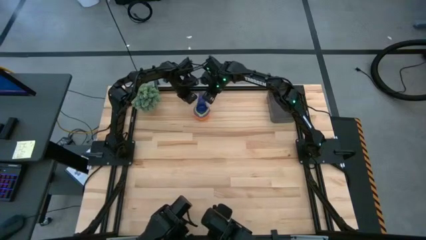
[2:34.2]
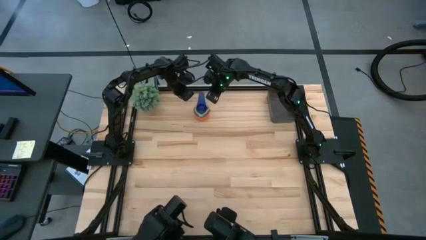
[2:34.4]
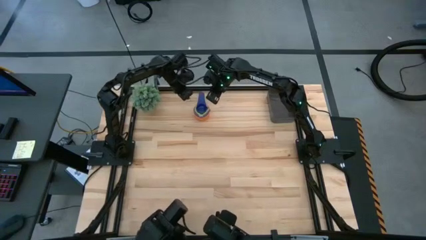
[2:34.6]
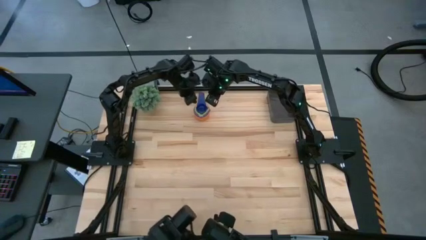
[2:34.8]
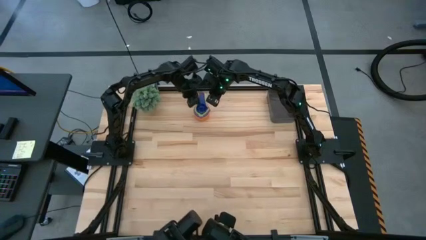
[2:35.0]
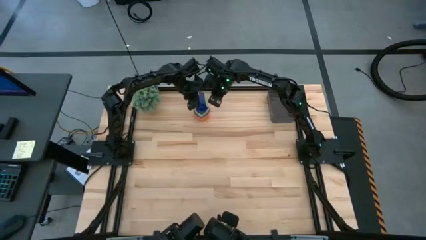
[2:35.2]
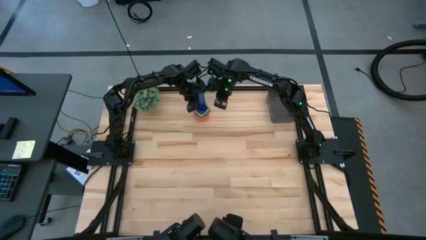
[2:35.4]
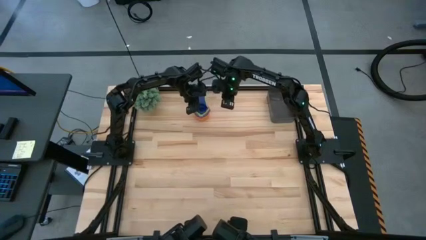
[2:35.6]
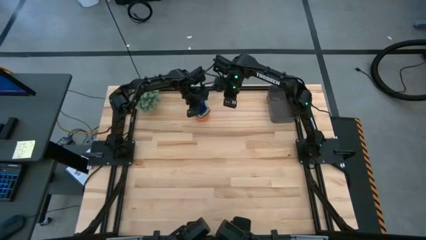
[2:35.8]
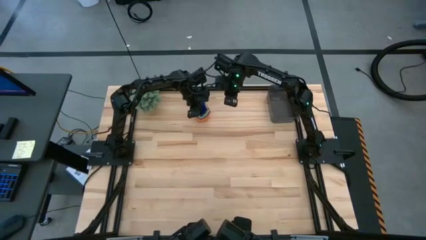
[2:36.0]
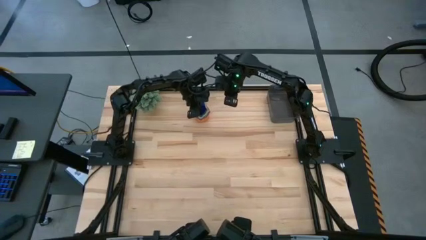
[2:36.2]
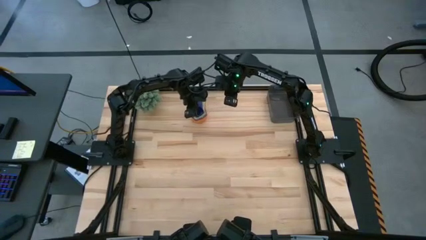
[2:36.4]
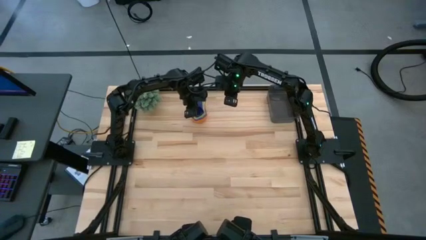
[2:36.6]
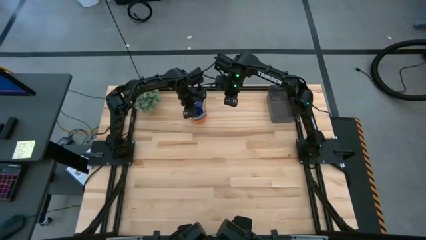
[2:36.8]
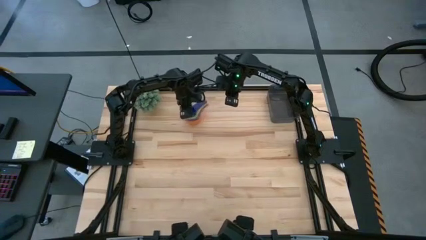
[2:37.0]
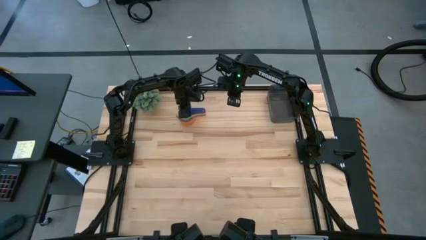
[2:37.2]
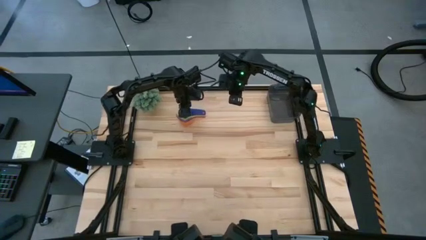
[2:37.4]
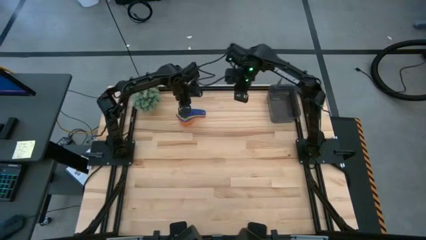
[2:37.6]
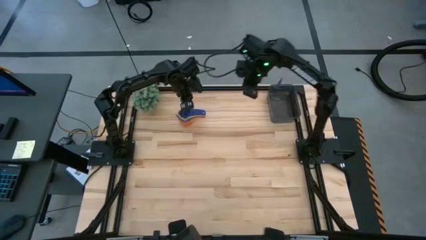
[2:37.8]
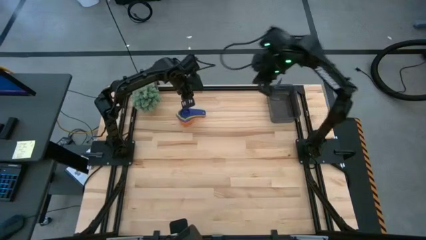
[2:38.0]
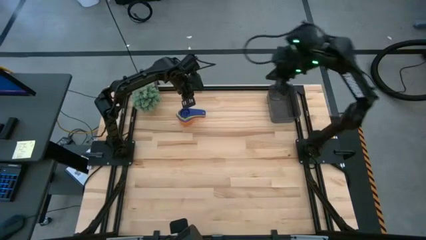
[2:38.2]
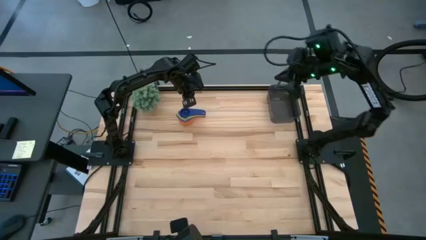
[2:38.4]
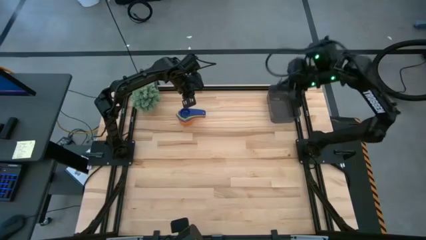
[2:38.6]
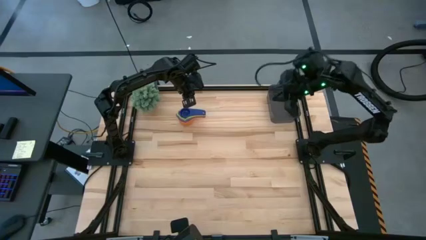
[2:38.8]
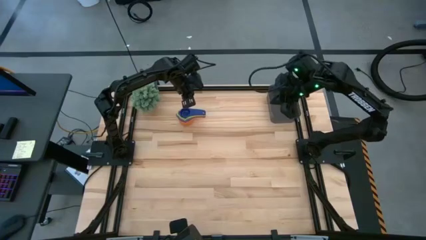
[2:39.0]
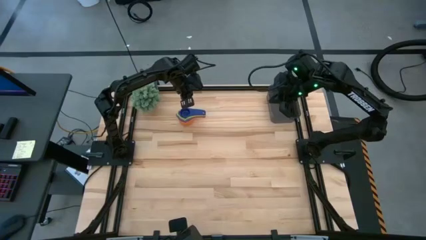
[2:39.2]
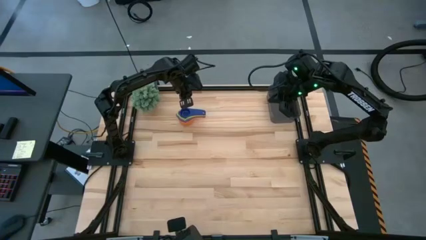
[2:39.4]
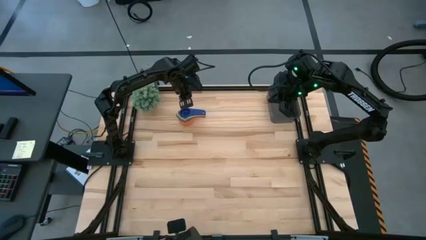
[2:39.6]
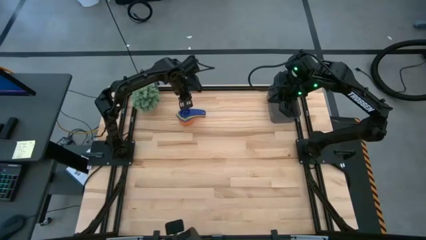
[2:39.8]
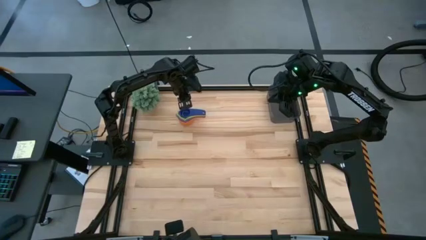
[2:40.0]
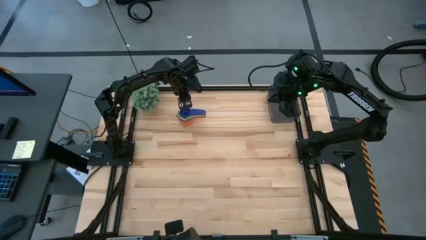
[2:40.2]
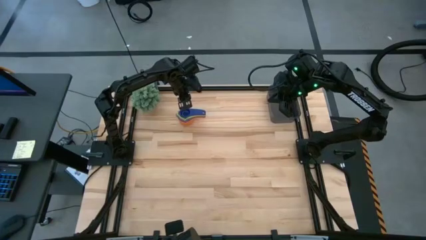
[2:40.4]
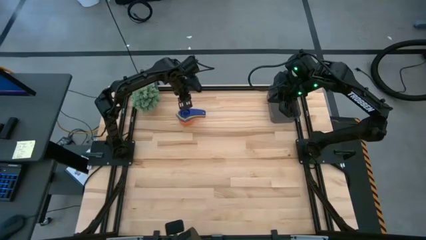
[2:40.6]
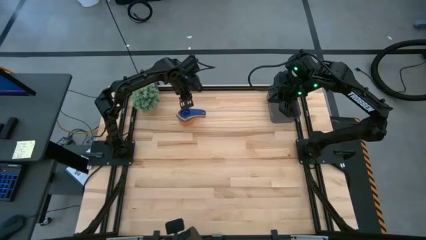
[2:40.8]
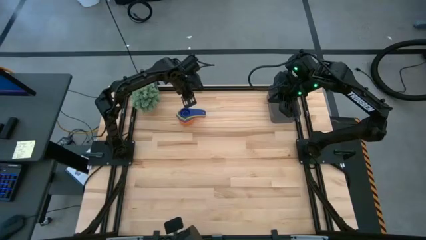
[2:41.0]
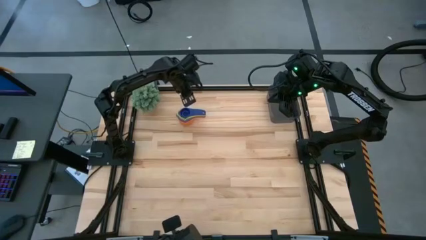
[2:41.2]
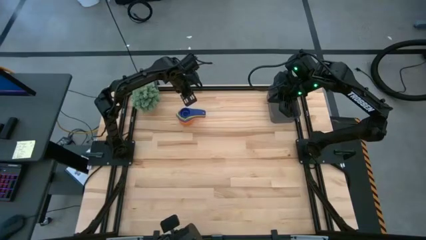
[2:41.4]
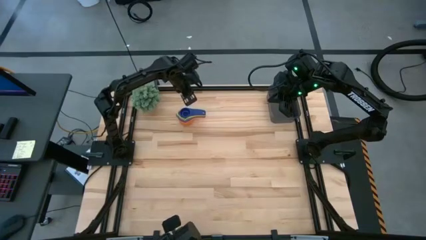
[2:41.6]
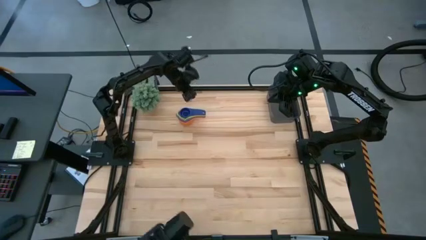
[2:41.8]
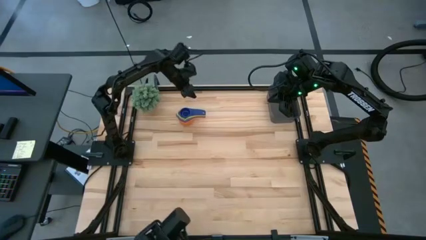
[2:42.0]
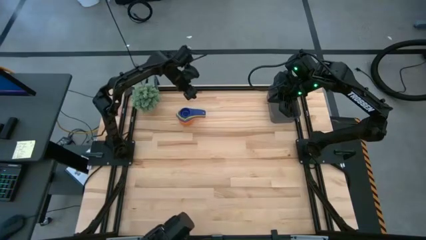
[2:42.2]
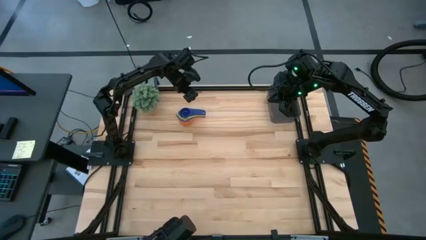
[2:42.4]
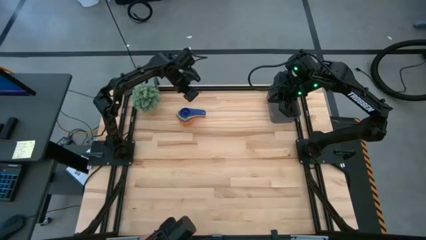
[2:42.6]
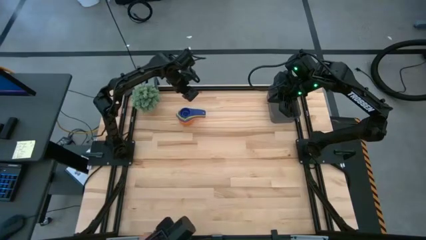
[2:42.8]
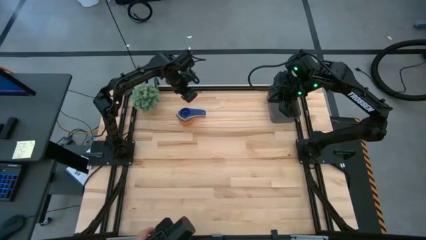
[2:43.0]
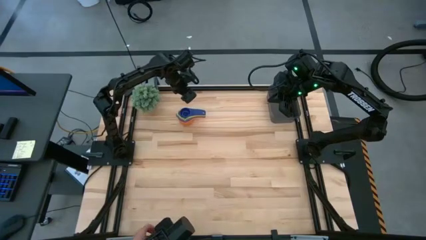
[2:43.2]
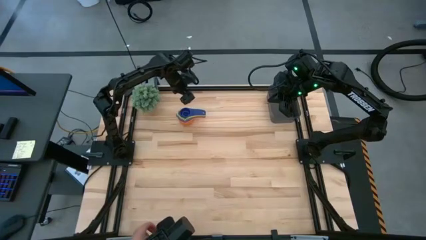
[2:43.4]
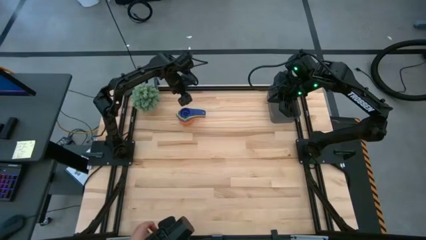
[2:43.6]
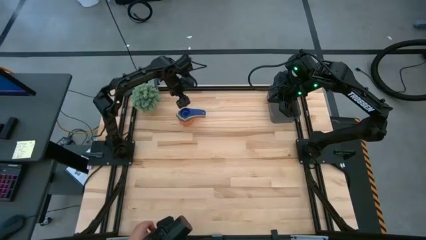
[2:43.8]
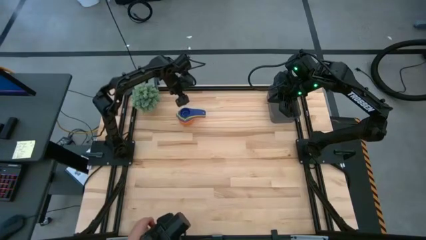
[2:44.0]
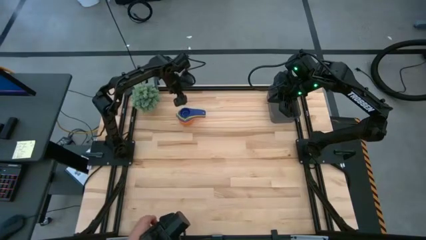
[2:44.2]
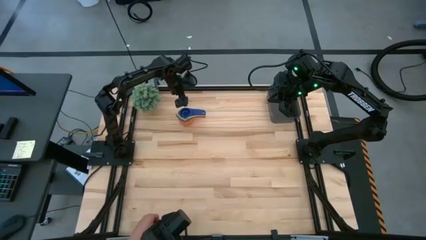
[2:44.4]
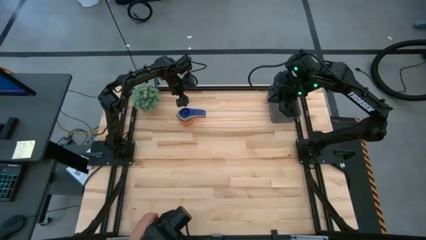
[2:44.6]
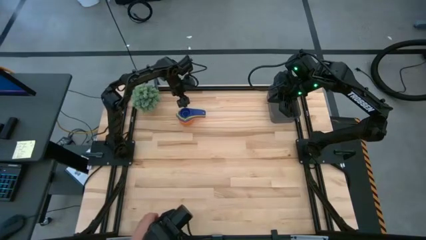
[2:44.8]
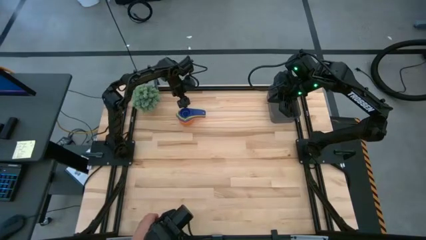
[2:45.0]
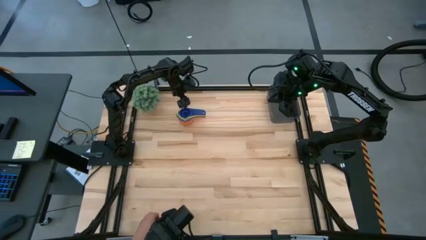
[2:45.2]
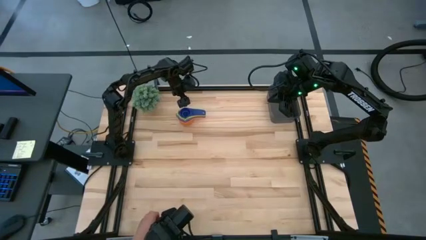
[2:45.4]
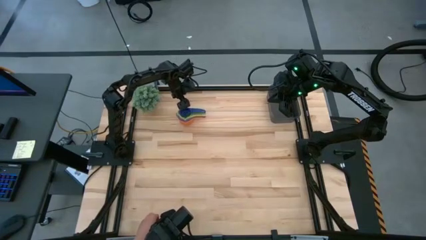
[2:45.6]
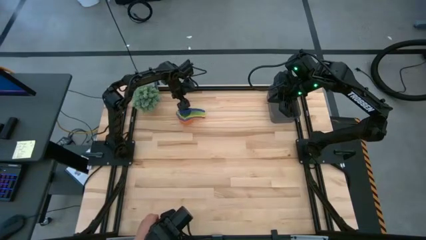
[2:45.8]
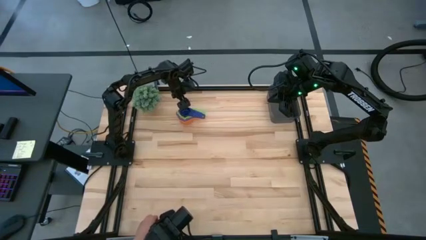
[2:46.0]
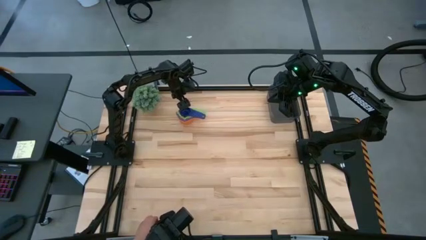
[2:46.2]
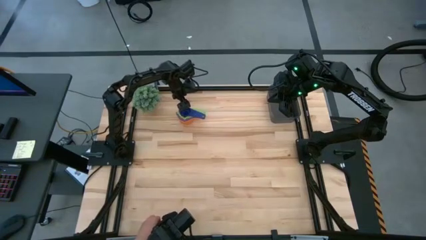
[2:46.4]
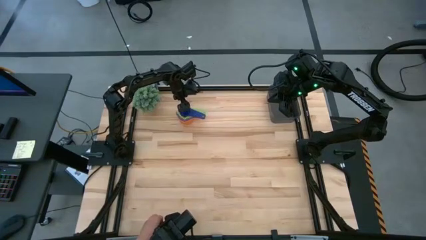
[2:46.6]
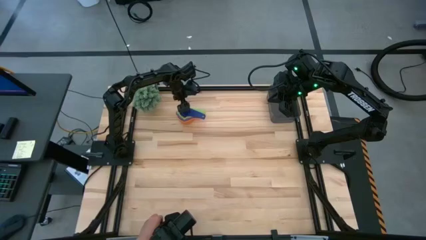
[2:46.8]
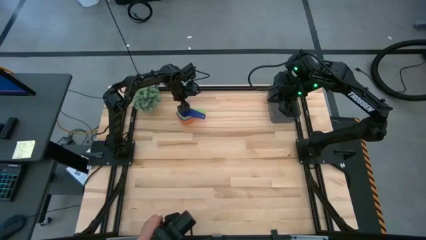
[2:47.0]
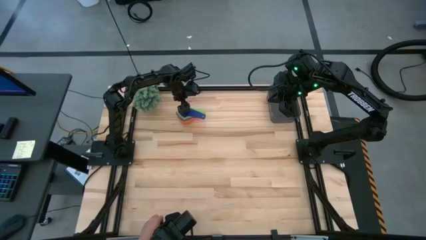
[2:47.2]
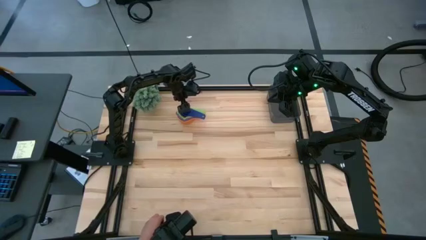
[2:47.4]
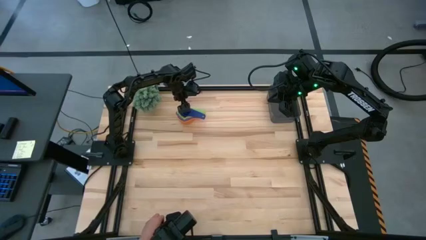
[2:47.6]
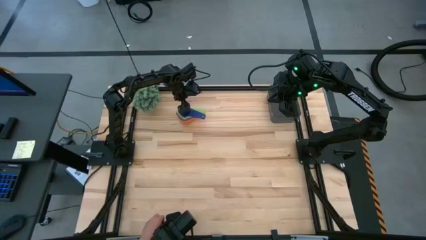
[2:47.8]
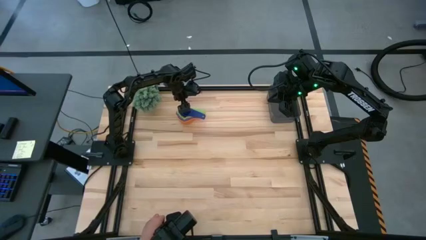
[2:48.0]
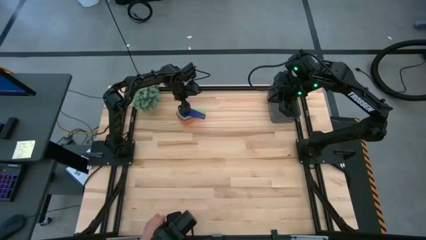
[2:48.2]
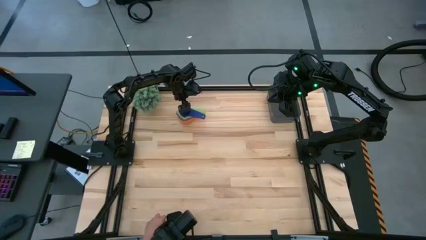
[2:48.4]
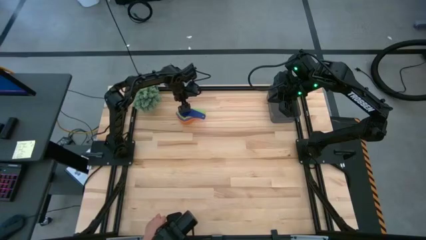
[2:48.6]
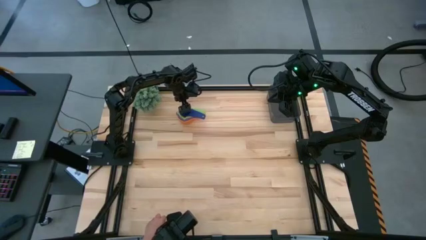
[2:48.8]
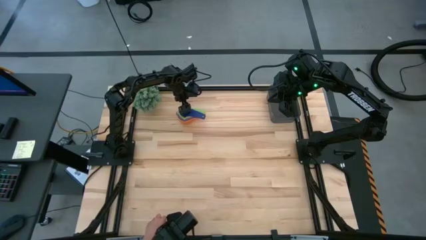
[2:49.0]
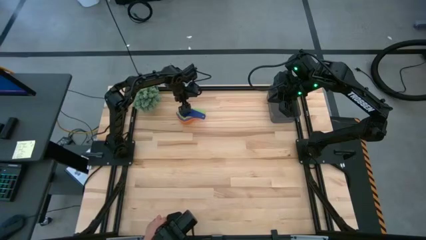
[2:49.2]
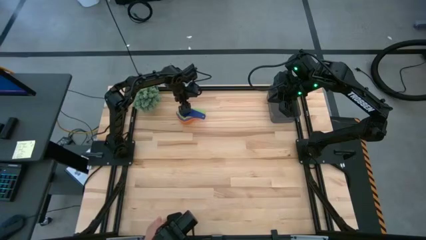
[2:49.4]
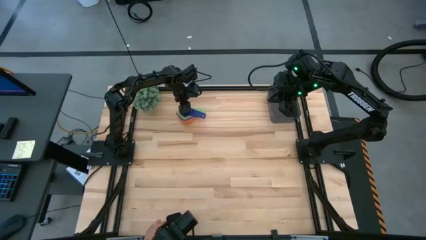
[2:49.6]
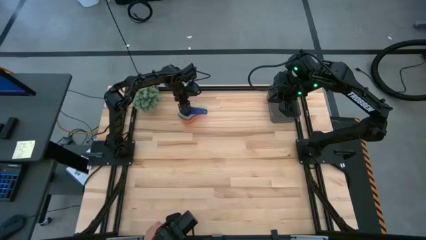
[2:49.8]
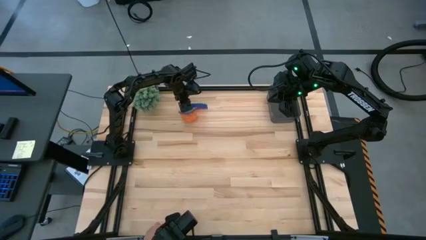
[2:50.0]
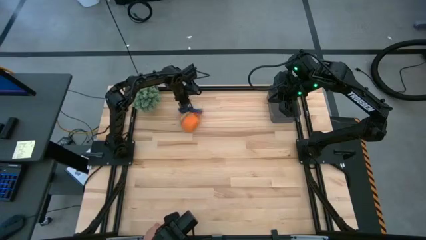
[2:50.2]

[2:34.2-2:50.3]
Task: Nest measuring cups in basket
Put the nested measuring cups into the black bin
